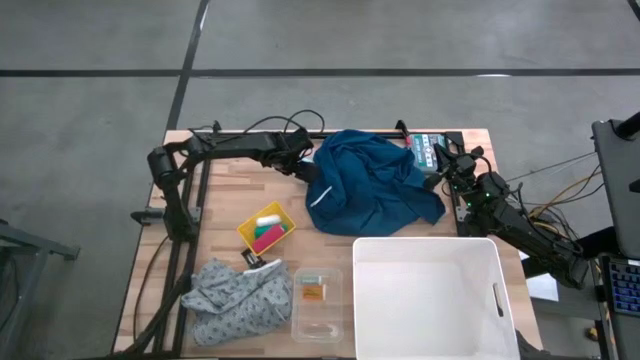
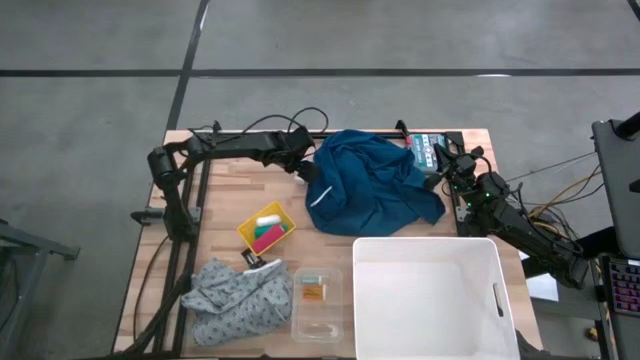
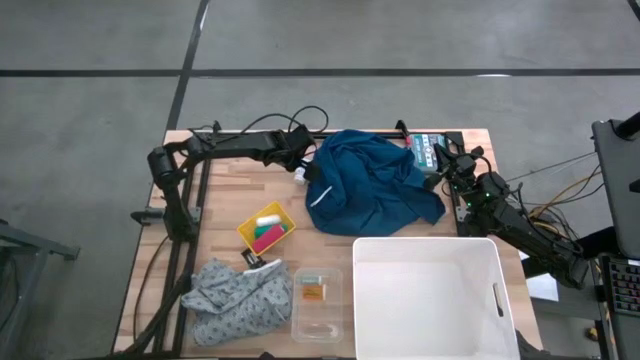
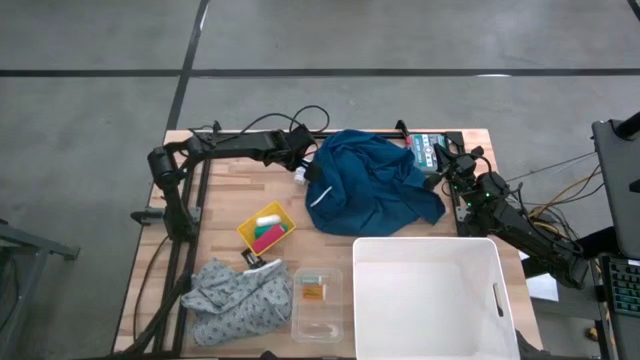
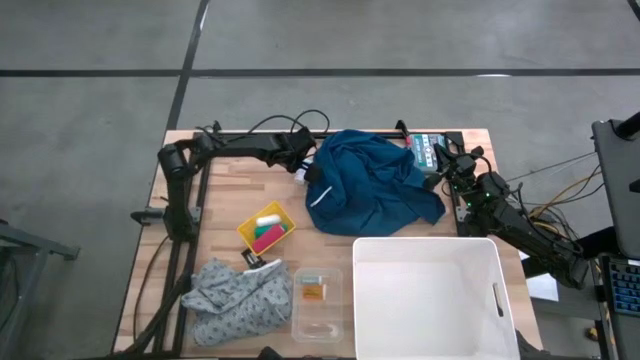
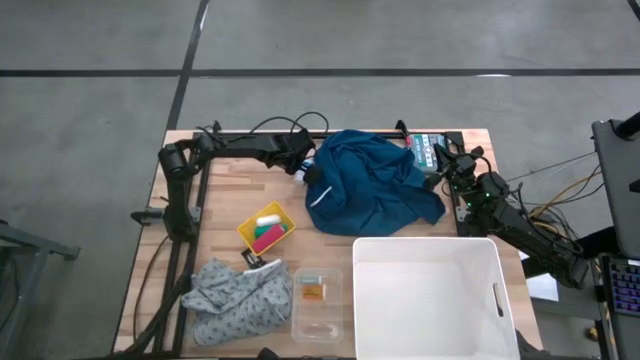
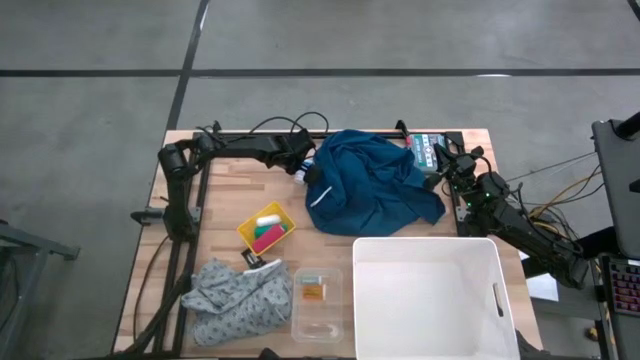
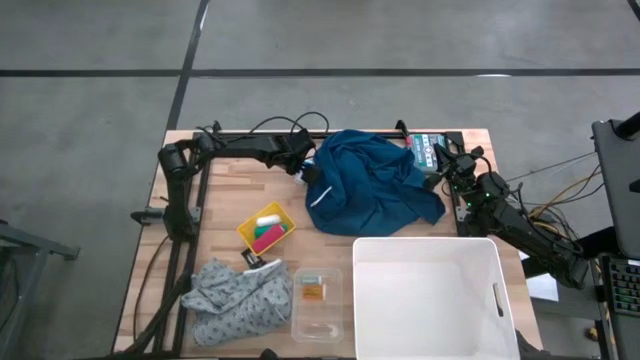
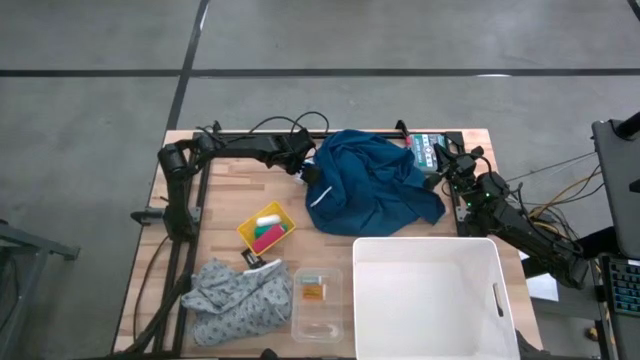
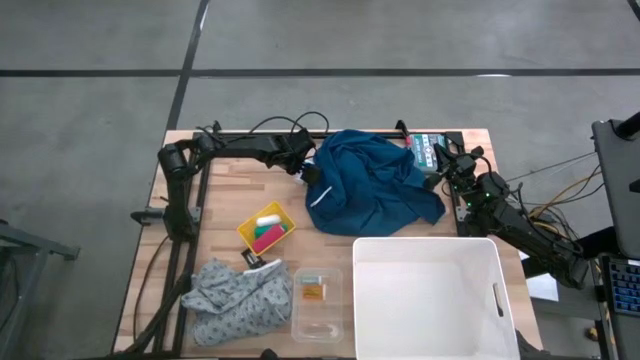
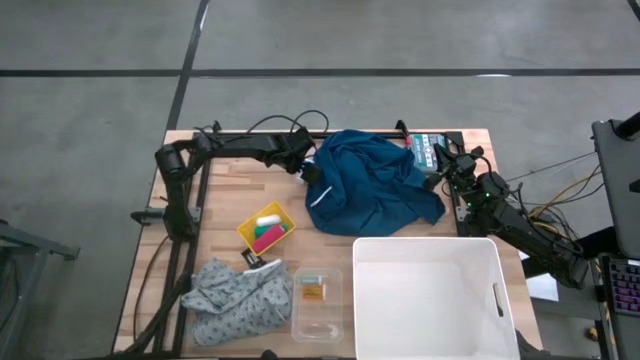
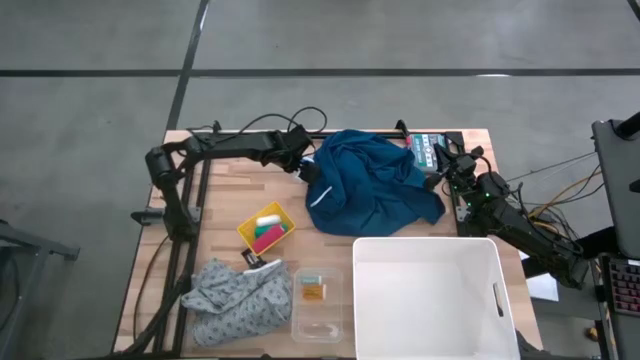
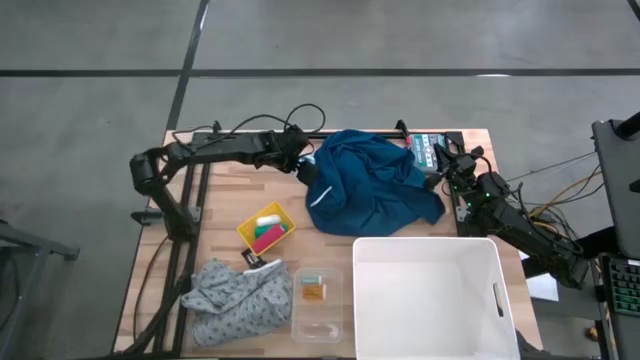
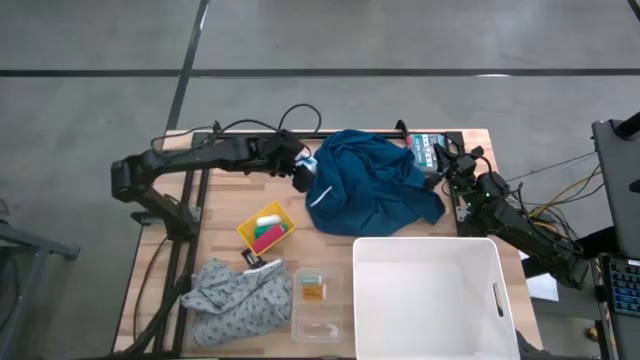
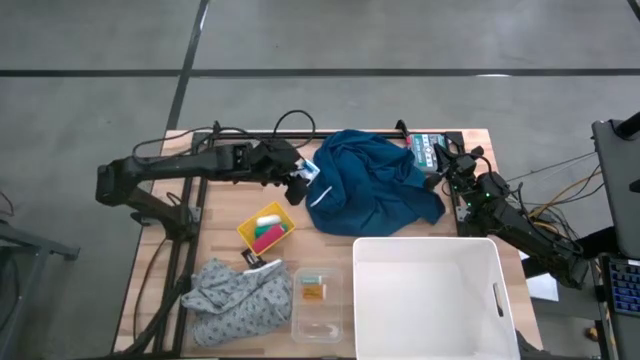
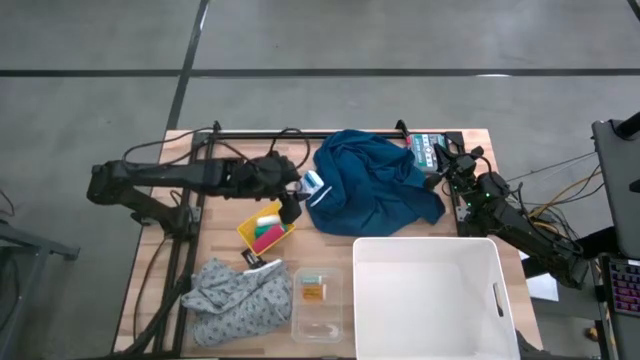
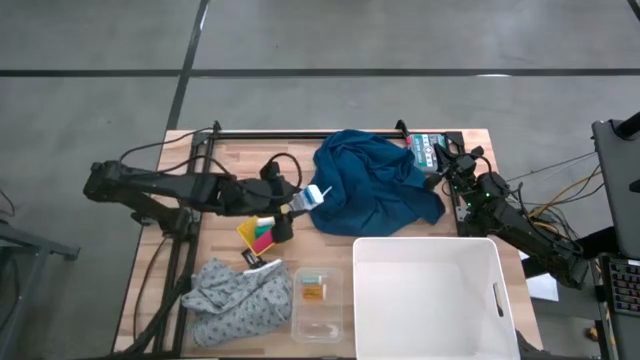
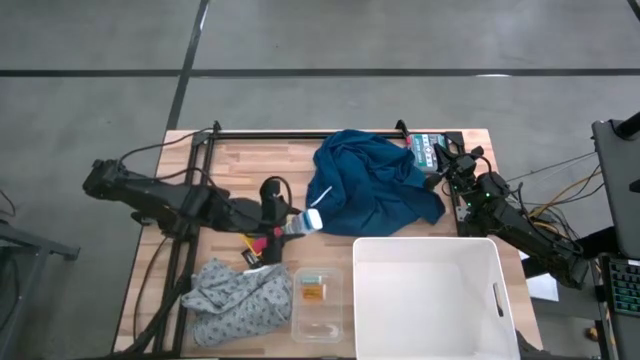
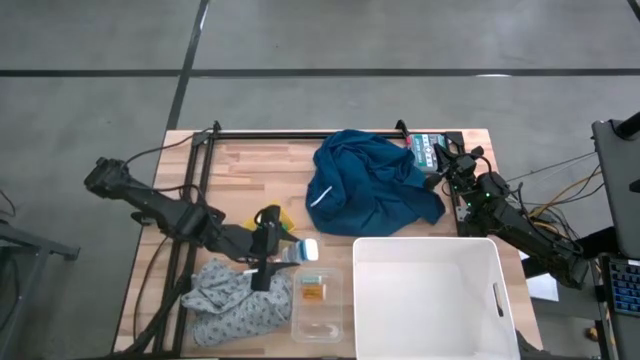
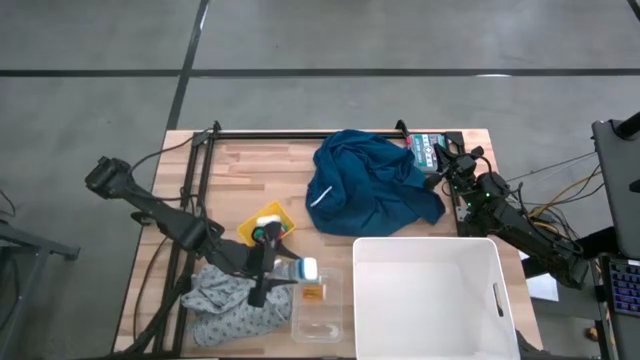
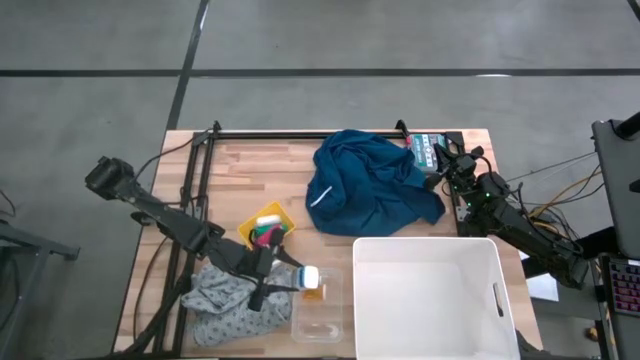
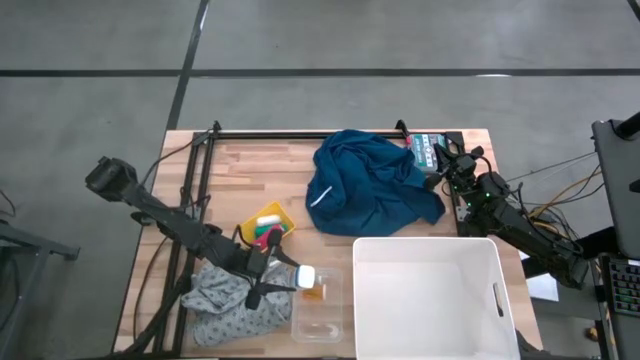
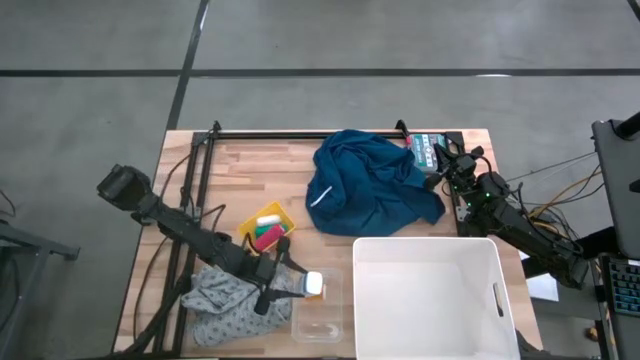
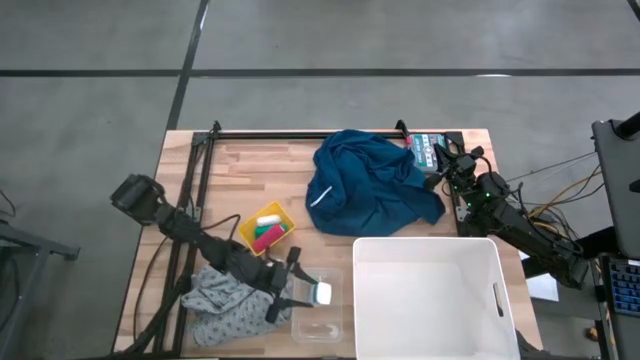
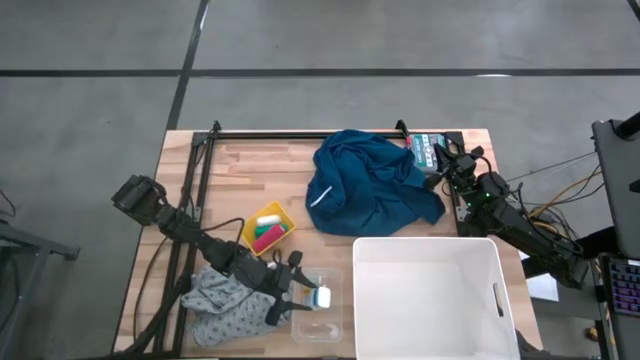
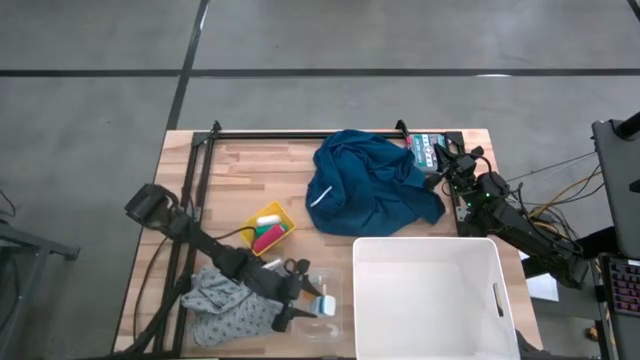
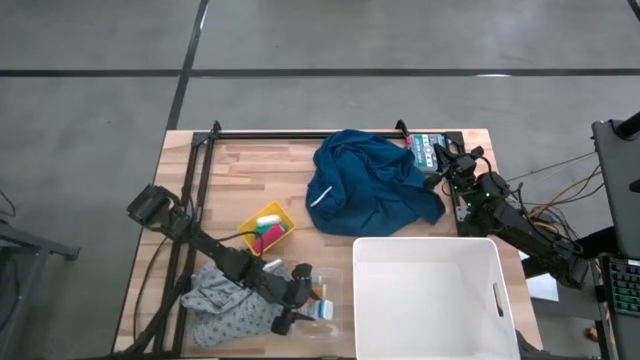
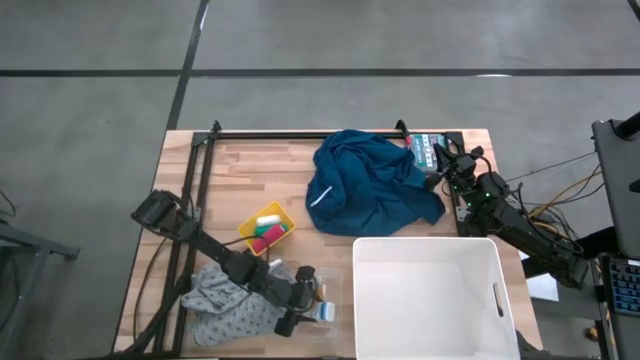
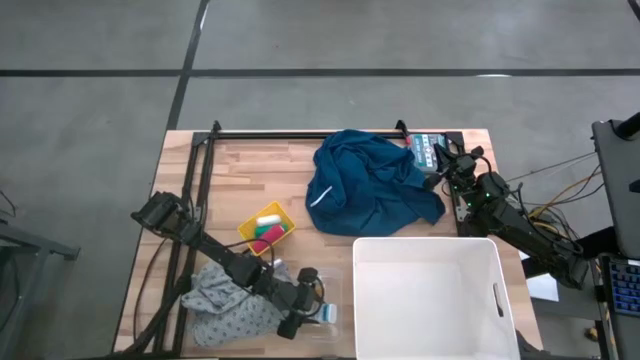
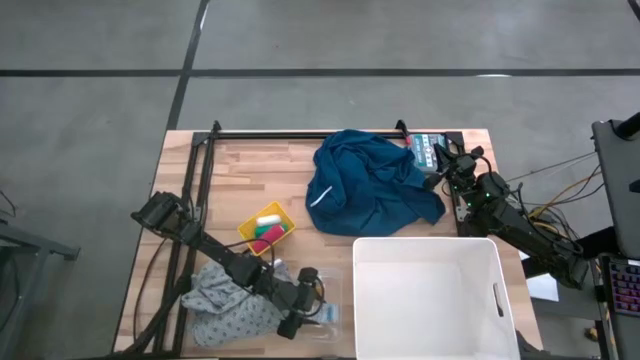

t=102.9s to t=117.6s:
Task: Pick & Place Medicine items
Put the white blue pill bottle into the transparent bin

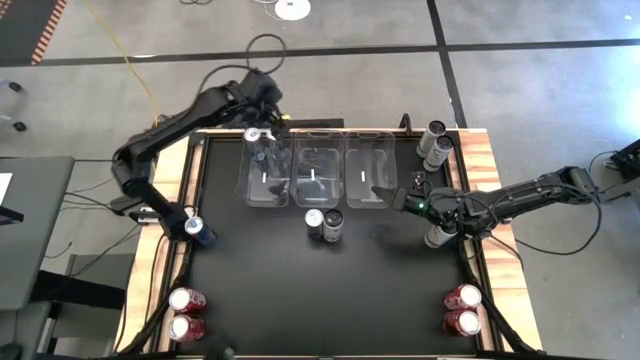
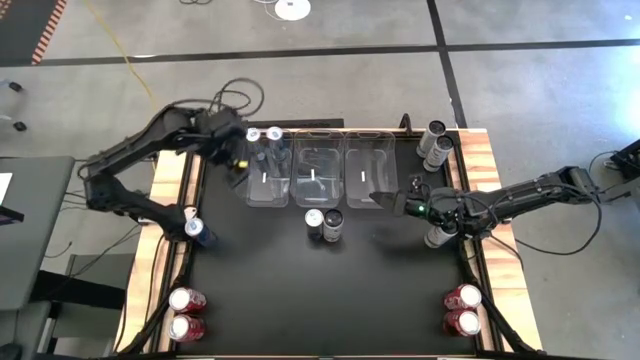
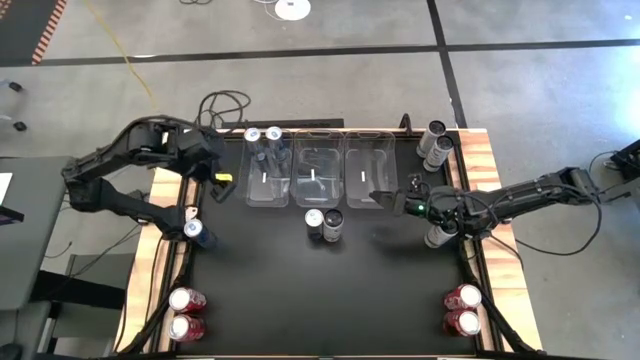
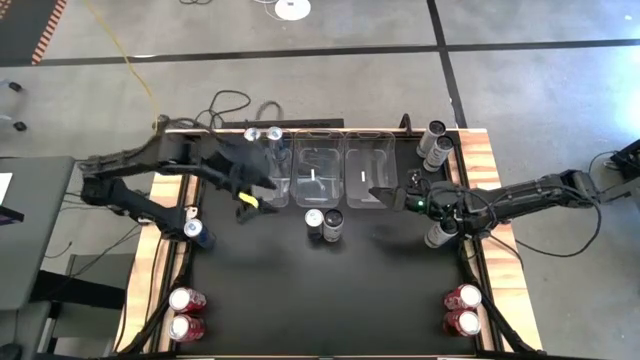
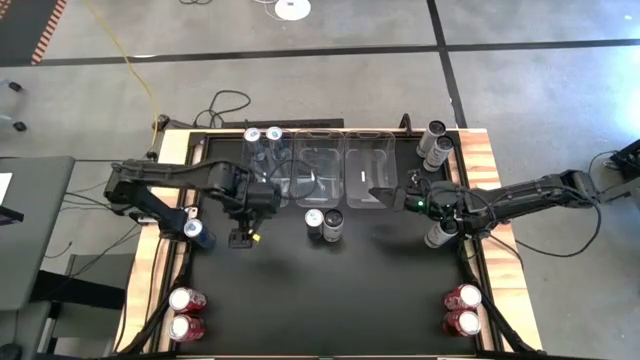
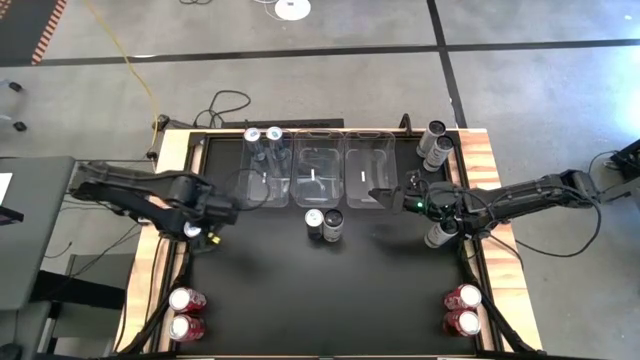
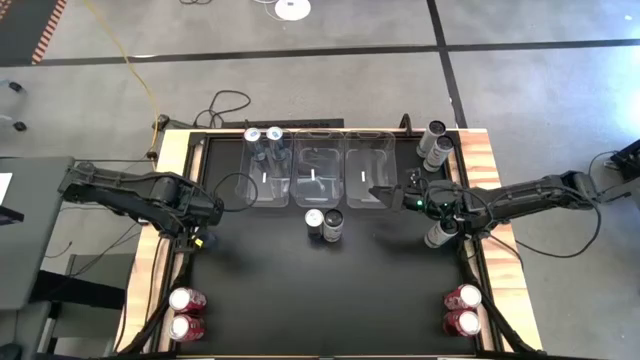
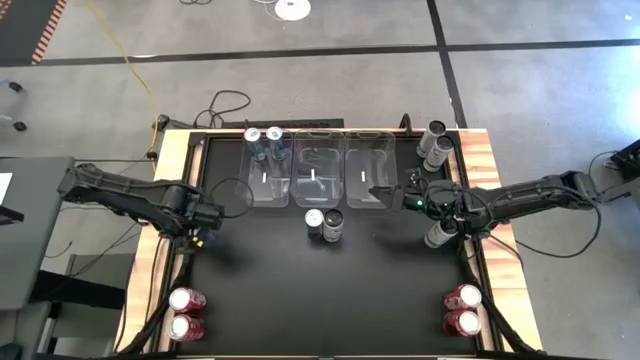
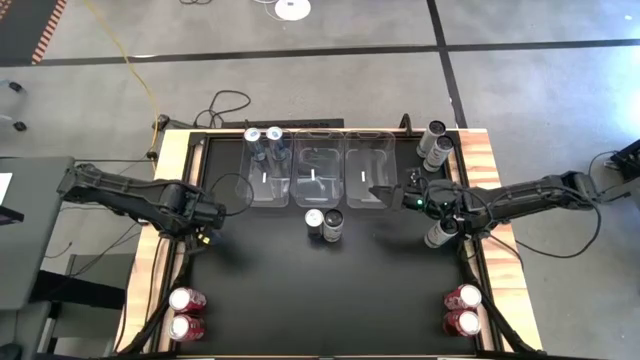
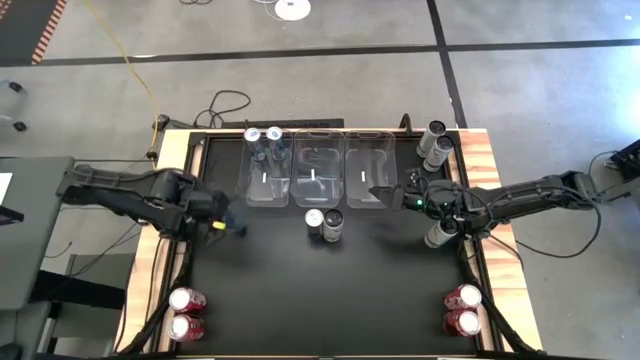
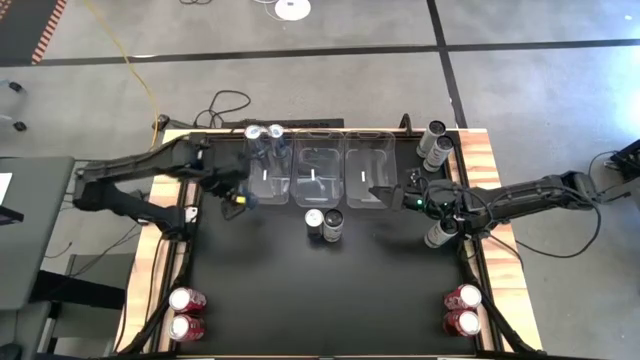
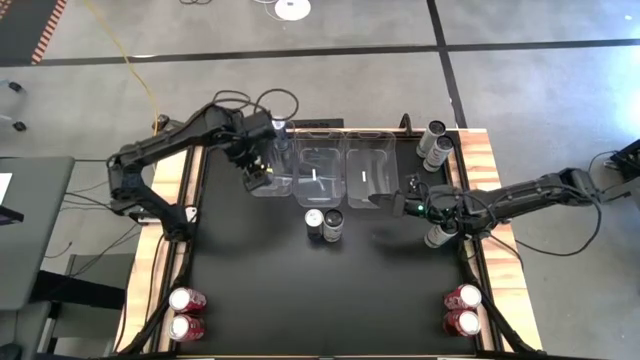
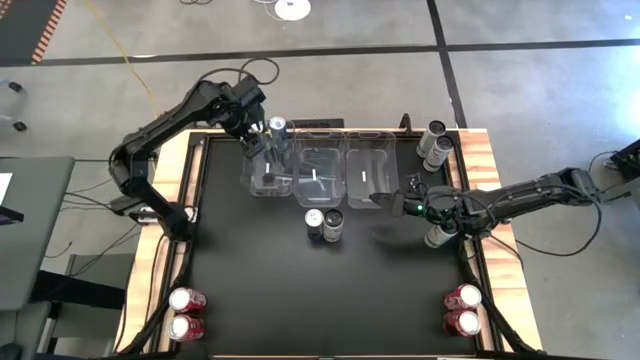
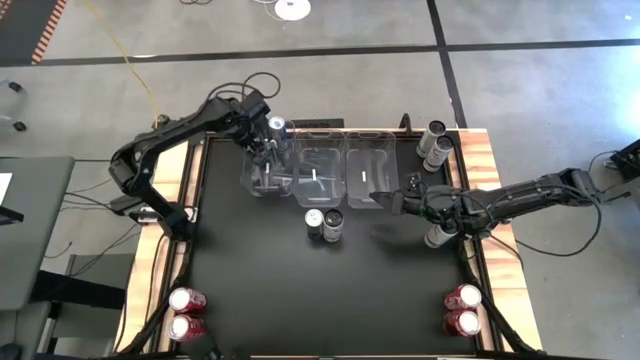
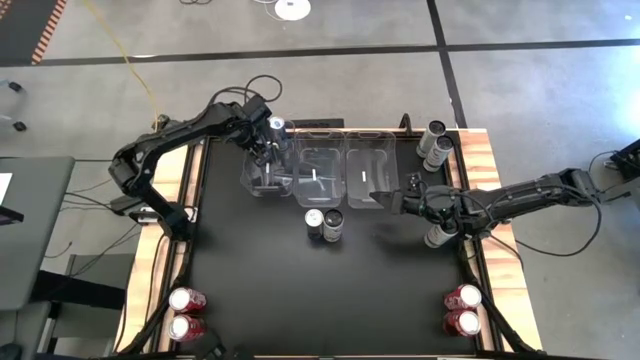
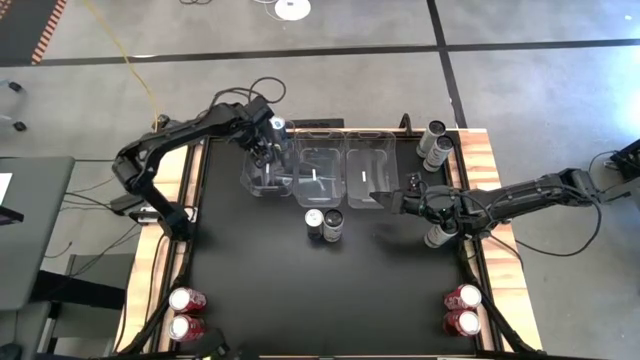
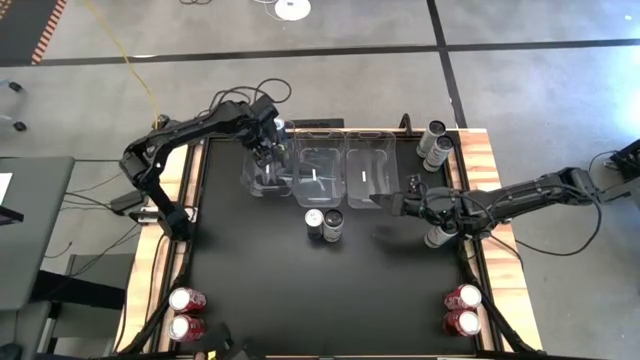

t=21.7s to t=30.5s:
Task: Sort soda cans
Put the left blue soda can into the left transparent bin
